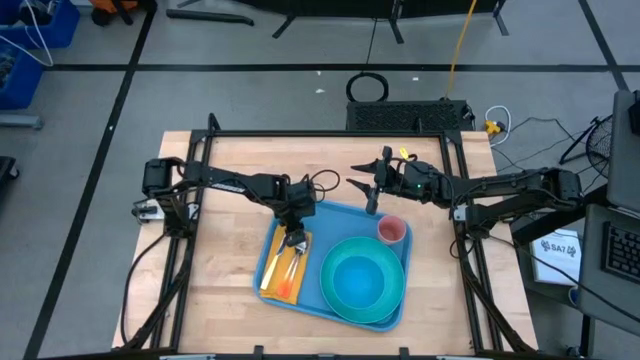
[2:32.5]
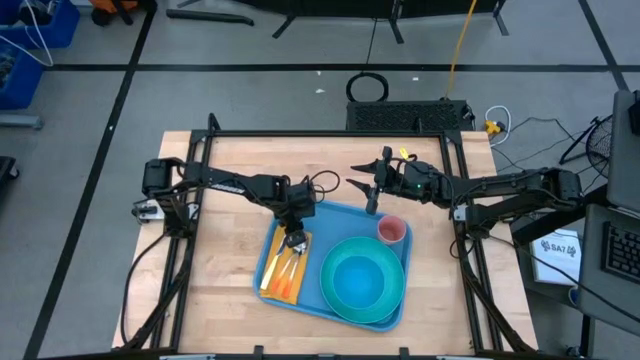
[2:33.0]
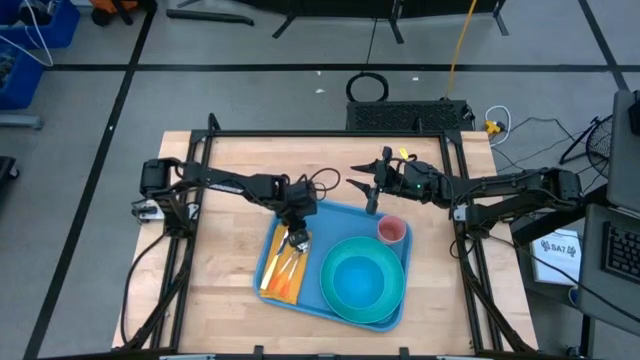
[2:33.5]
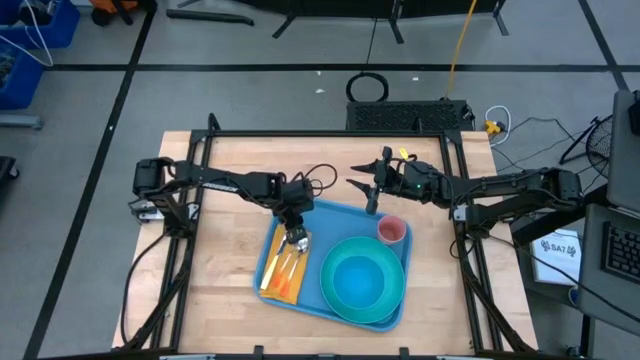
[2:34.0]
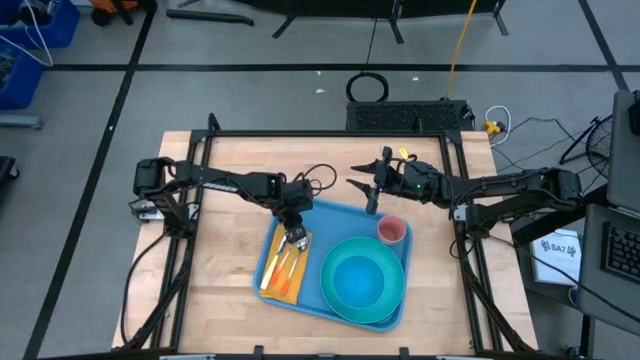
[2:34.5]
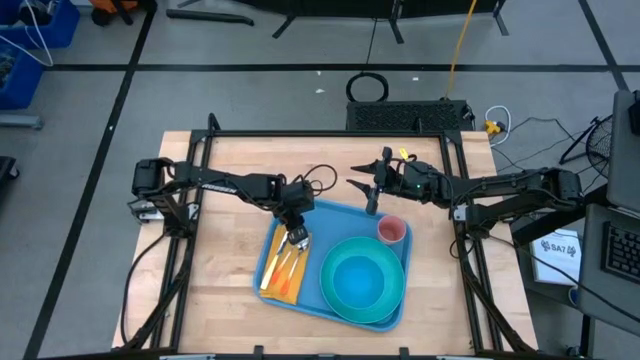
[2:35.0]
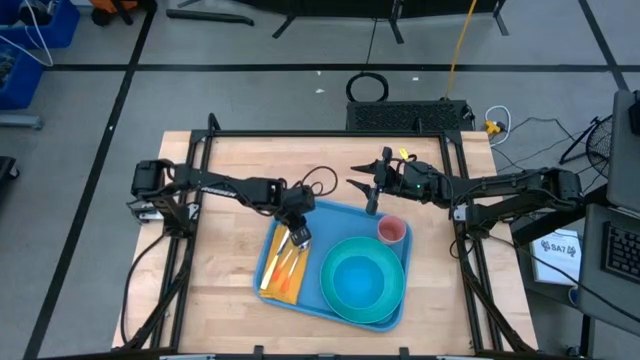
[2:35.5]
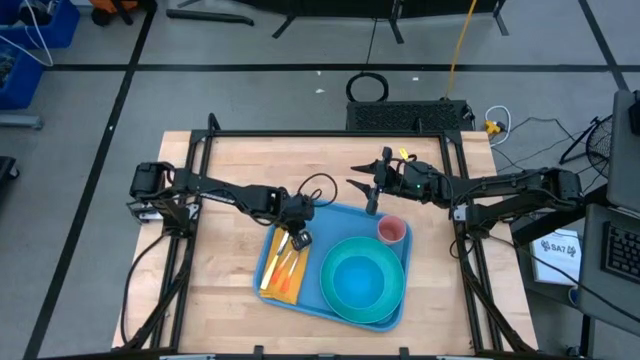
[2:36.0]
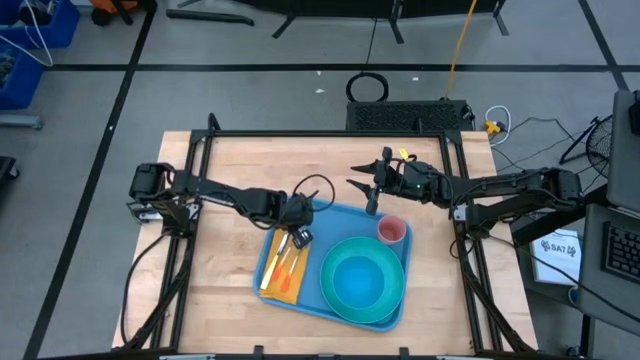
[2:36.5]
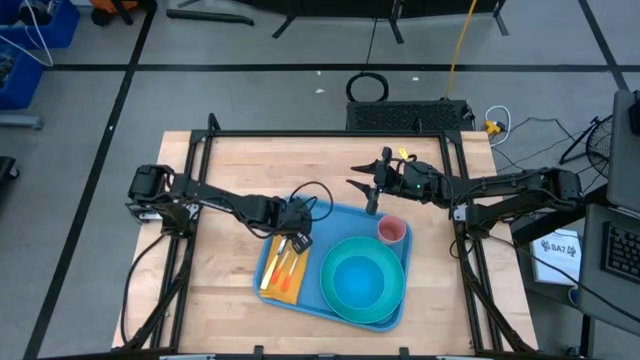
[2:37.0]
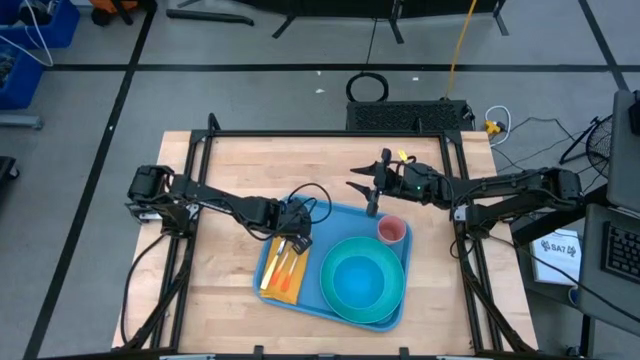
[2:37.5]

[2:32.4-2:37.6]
Task: Set up tray
Put the orange fork on top of the yellow table napkin

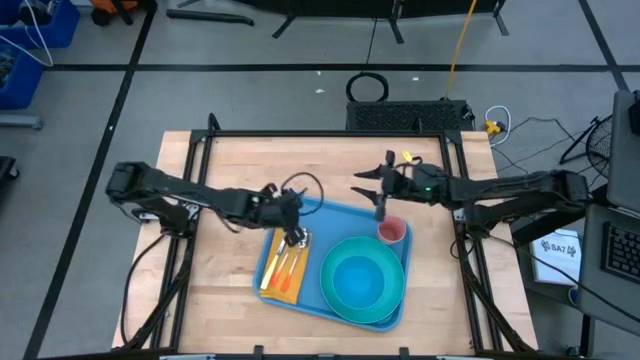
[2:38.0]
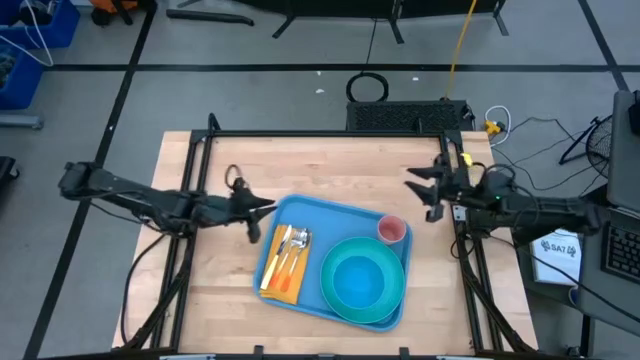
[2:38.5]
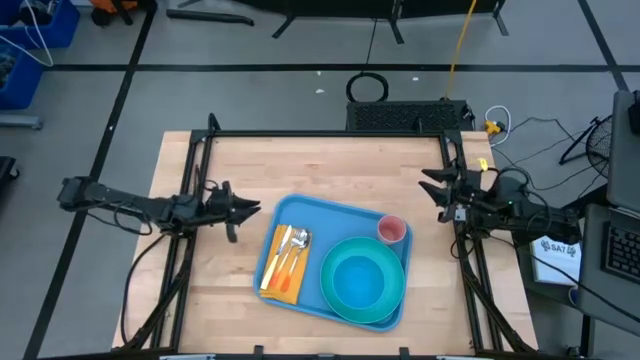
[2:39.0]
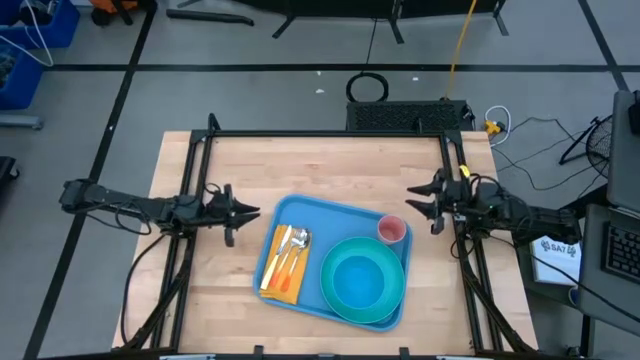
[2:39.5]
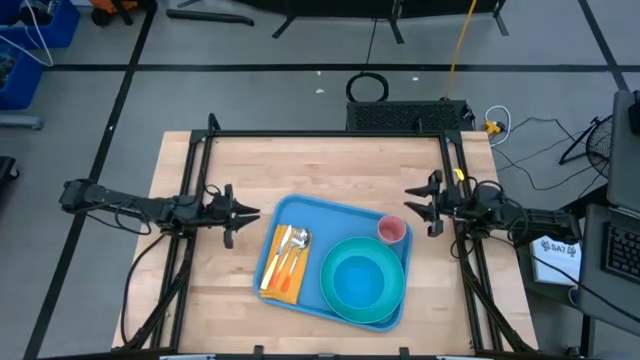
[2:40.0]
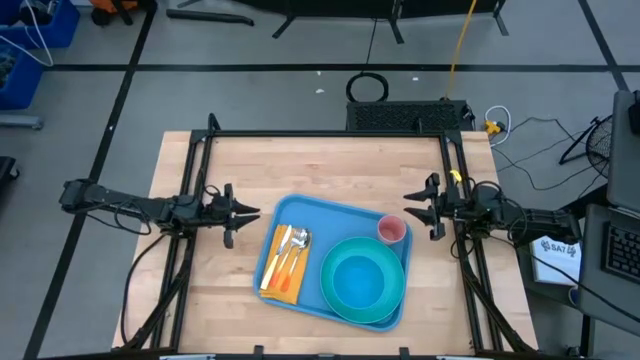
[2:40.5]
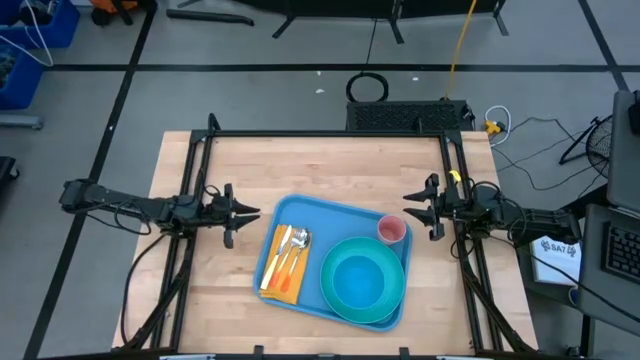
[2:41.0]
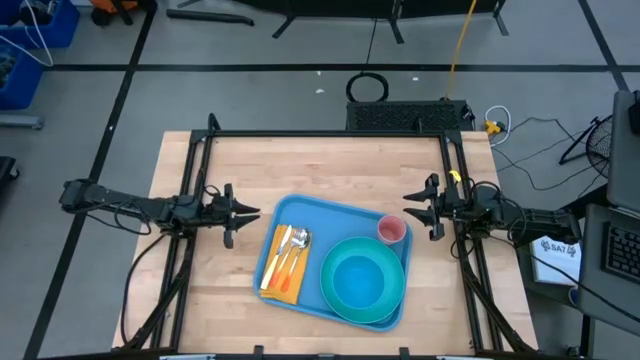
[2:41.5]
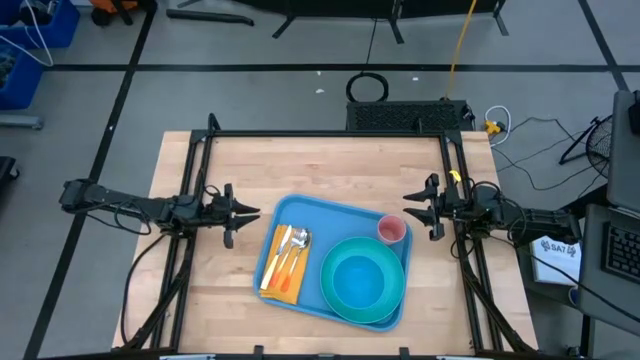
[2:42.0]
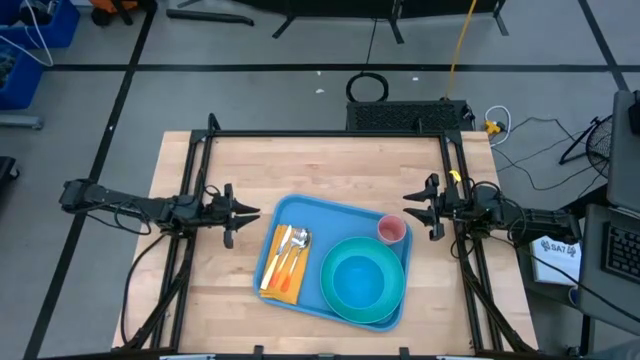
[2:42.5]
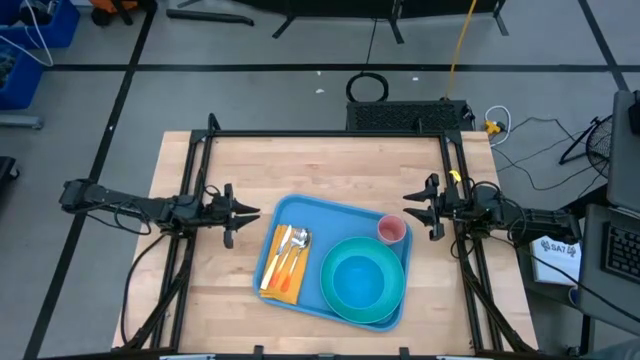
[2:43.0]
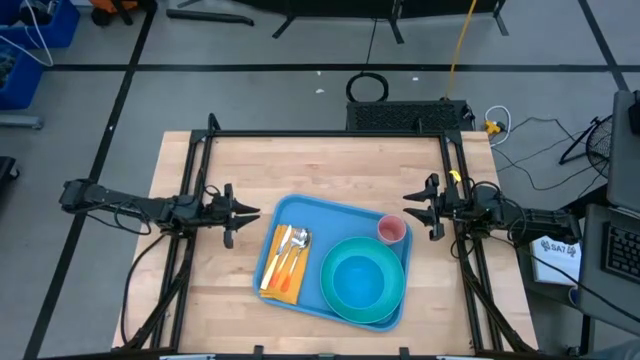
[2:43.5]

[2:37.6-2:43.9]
Return to Home Position

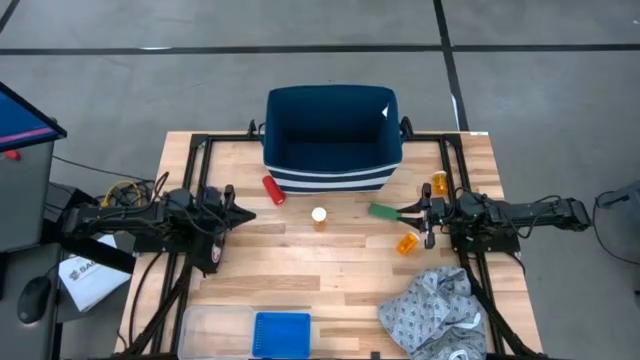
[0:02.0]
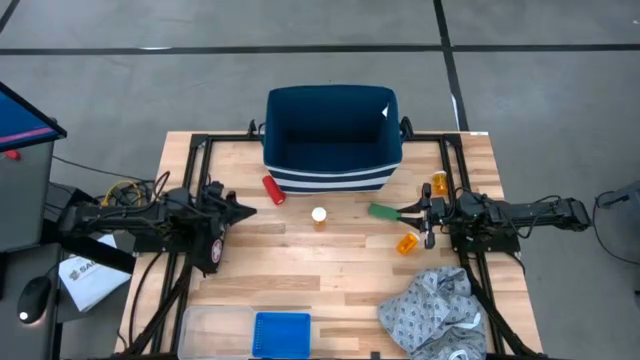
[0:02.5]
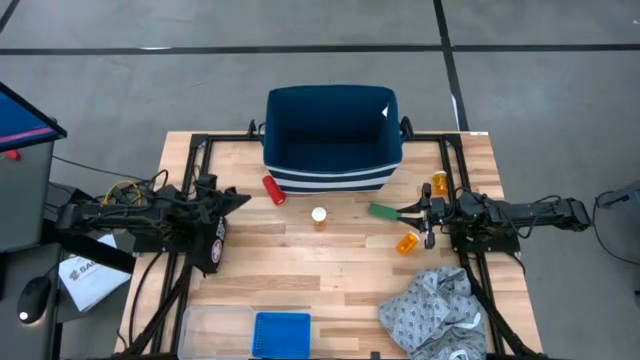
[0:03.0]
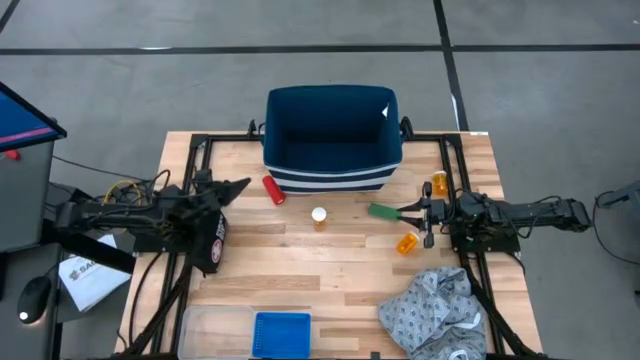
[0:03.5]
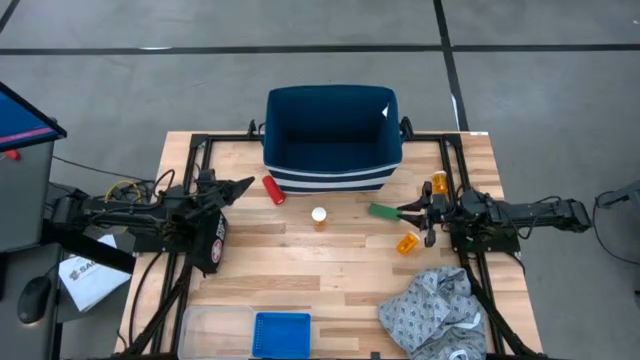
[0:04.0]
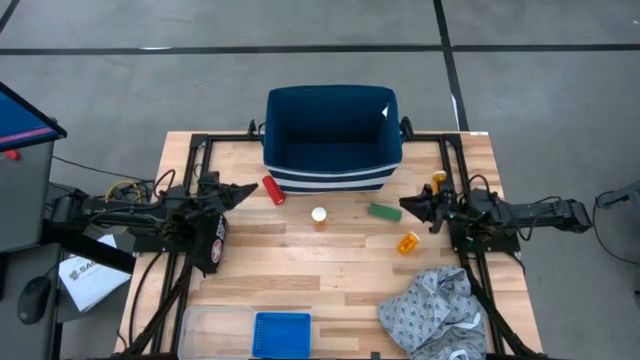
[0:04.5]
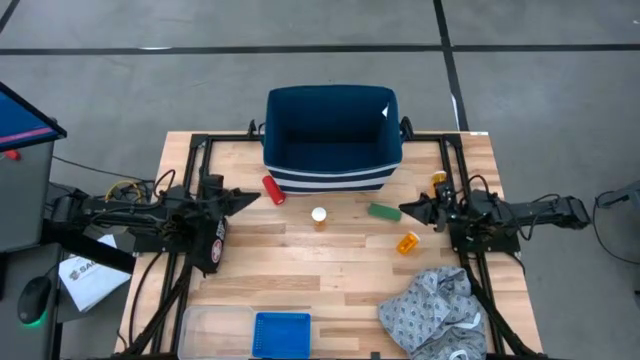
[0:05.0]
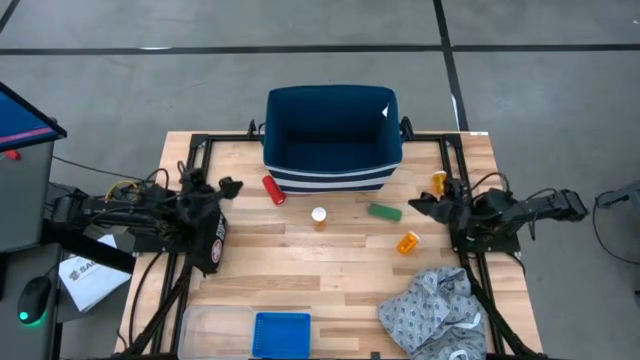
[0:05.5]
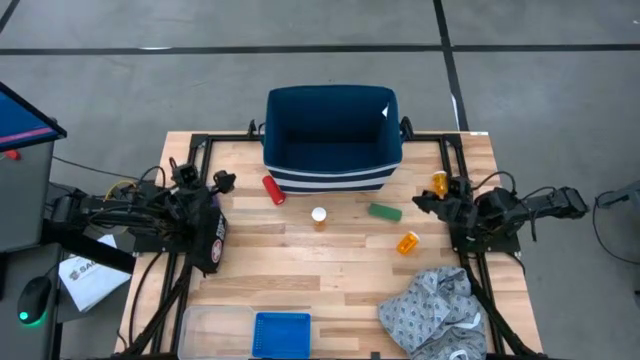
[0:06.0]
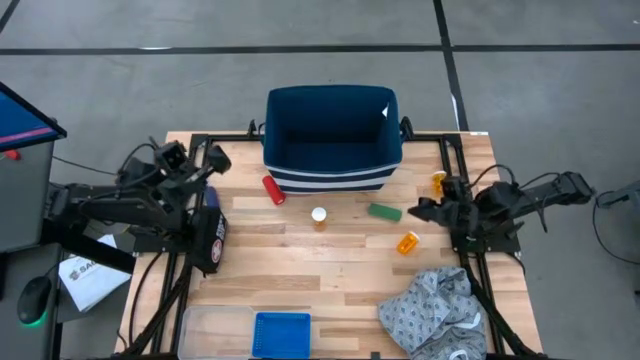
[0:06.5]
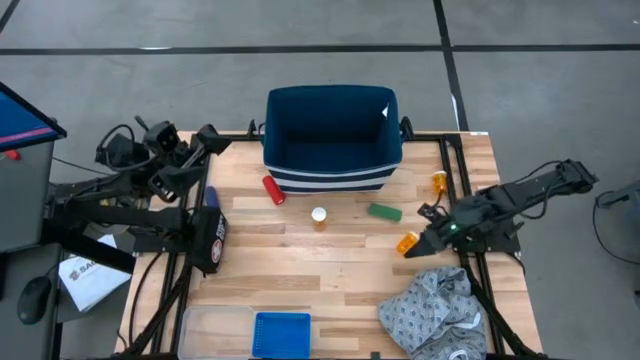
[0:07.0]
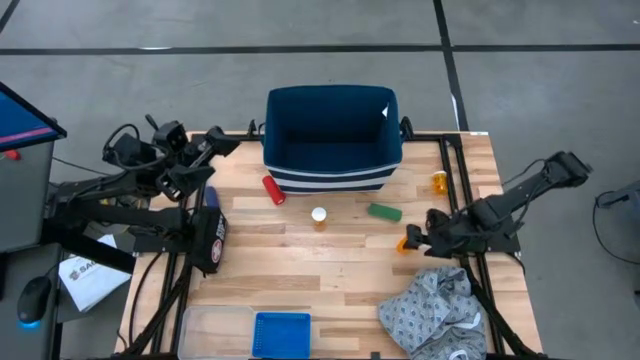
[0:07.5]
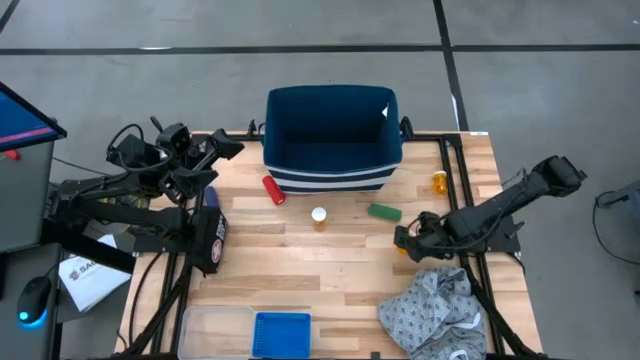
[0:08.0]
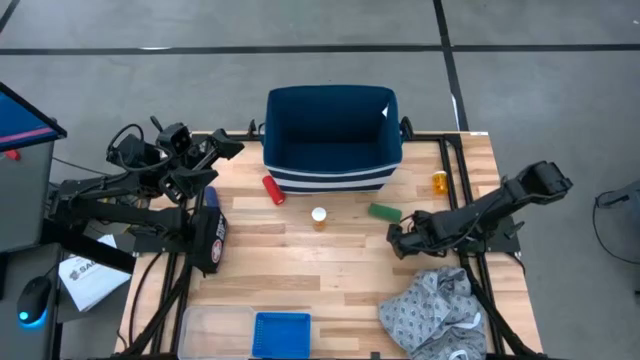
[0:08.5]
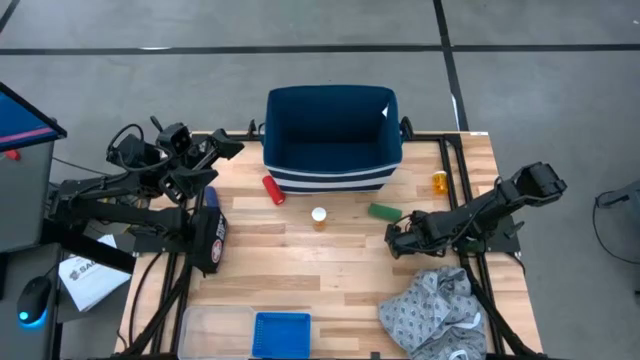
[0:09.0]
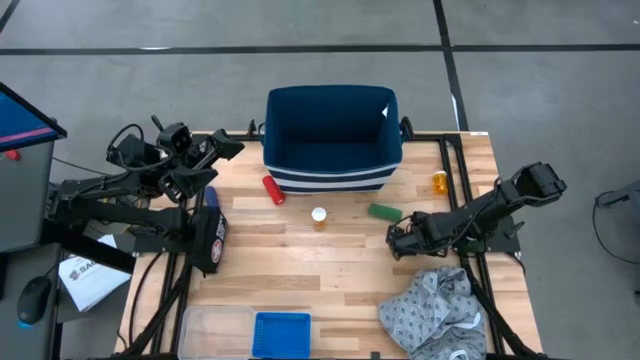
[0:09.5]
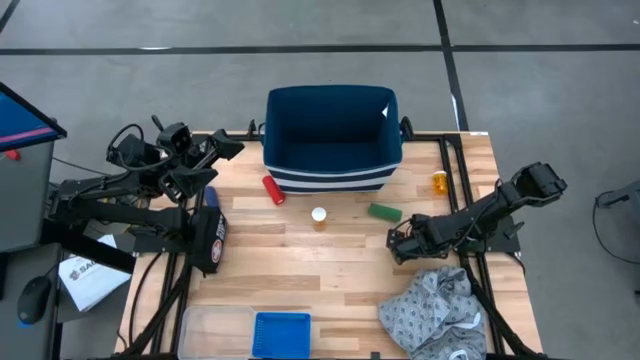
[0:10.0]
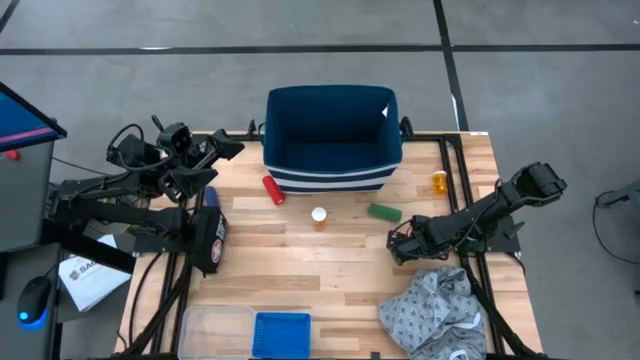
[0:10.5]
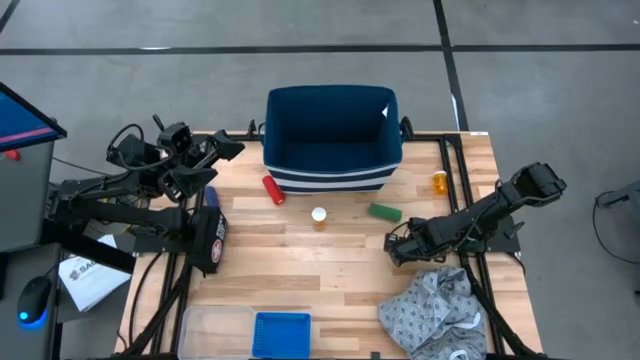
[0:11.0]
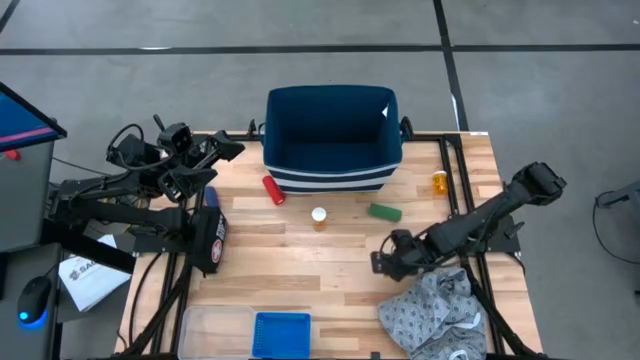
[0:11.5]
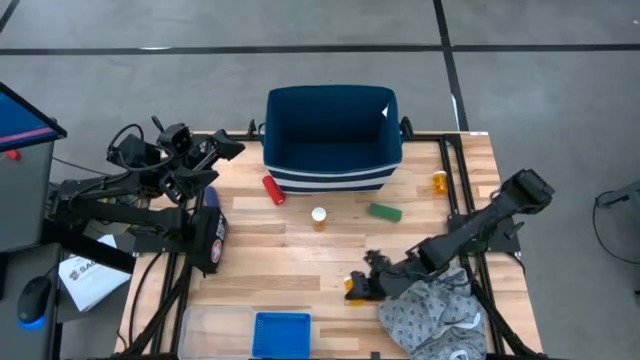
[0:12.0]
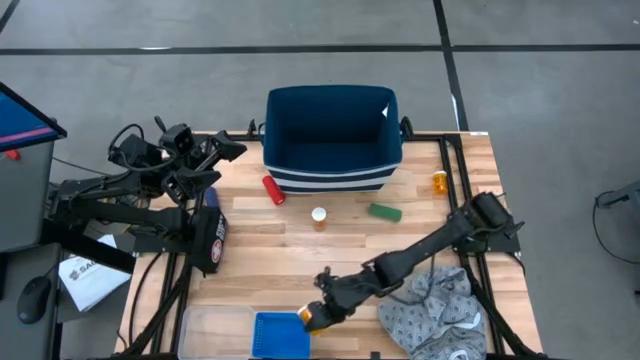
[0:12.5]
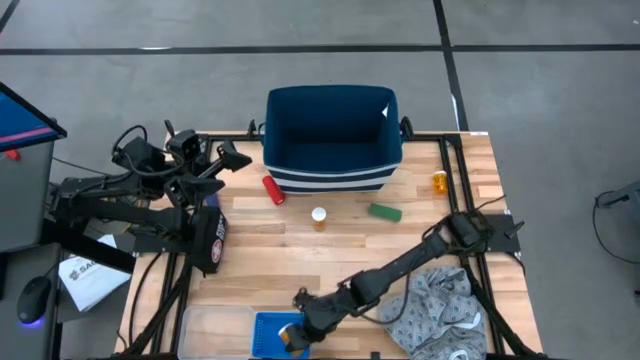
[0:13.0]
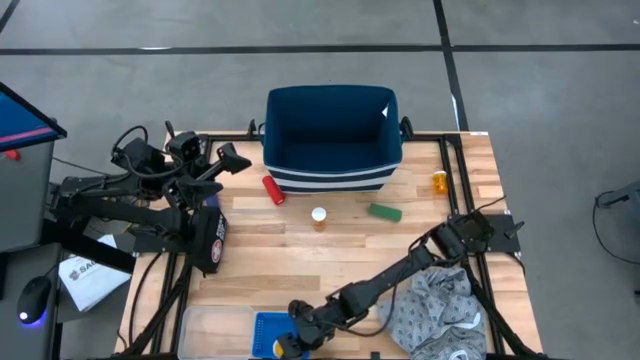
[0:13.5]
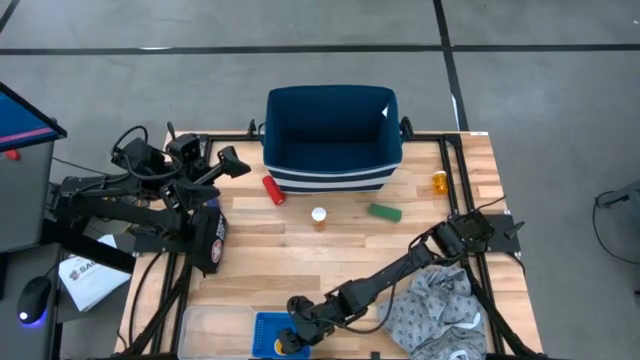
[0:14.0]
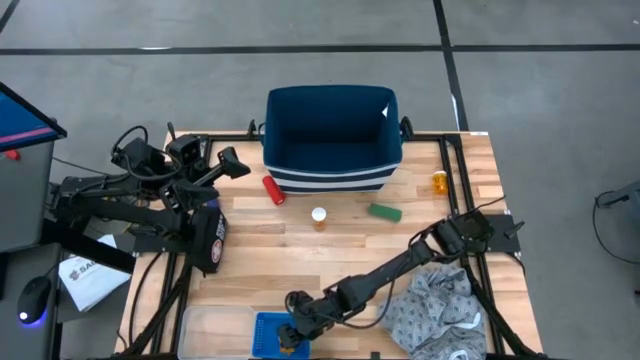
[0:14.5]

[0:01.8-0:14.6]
Task: Pick & place medical supplies in basket/bin
Put the middle yellow pill bottle into the blue basket
